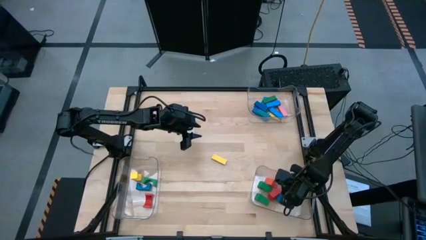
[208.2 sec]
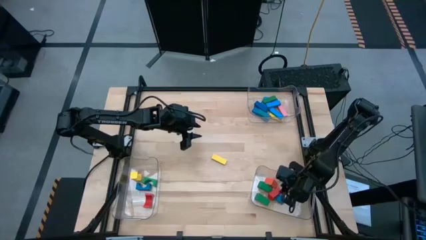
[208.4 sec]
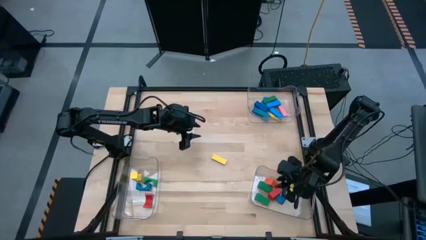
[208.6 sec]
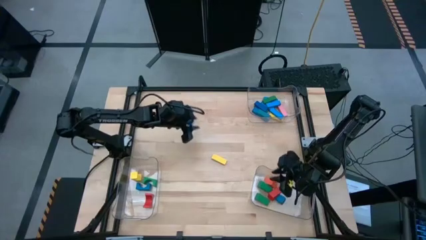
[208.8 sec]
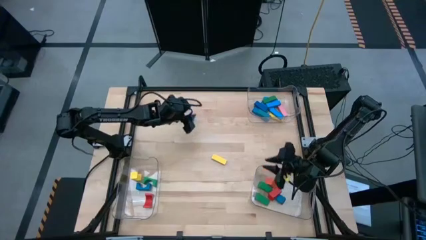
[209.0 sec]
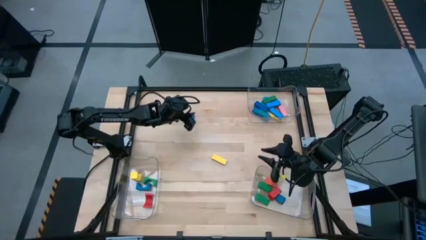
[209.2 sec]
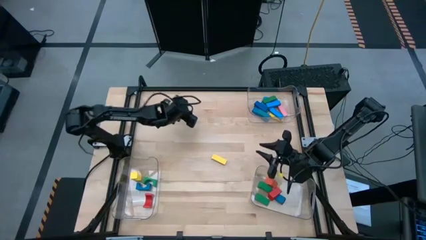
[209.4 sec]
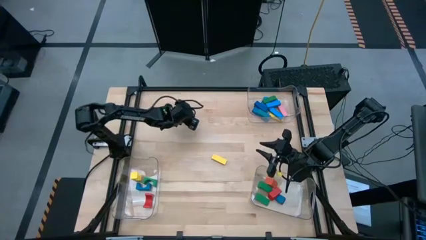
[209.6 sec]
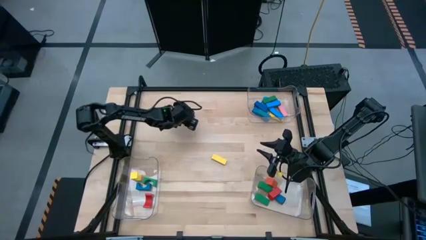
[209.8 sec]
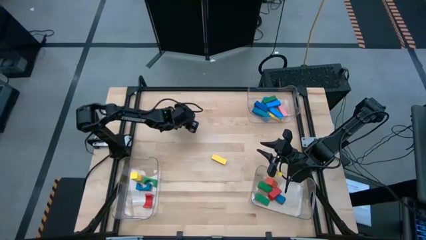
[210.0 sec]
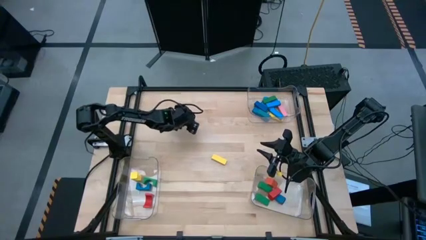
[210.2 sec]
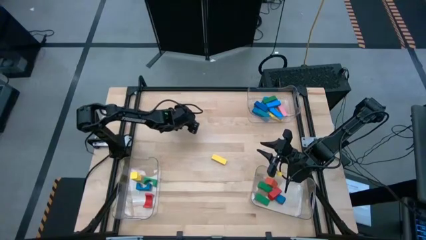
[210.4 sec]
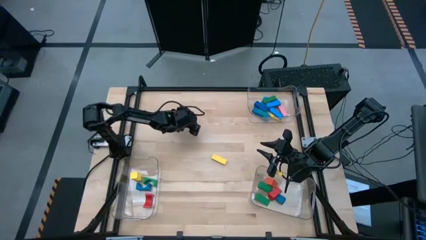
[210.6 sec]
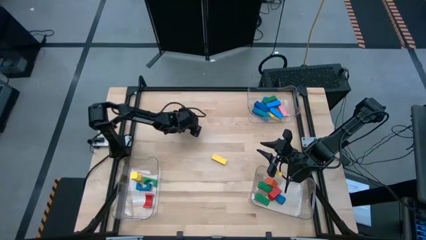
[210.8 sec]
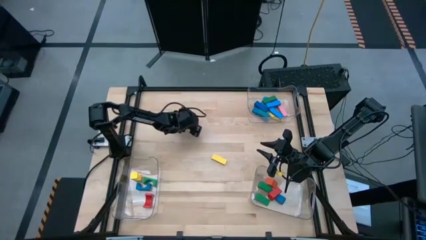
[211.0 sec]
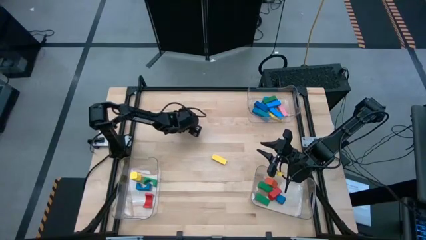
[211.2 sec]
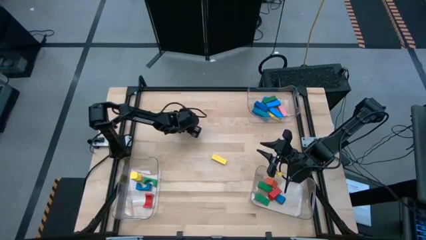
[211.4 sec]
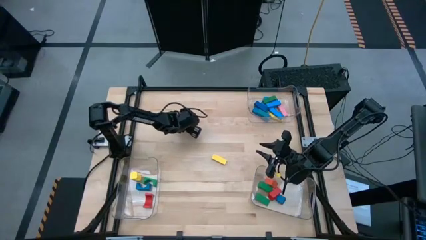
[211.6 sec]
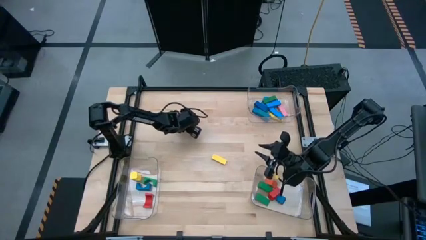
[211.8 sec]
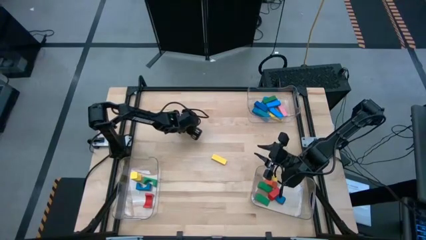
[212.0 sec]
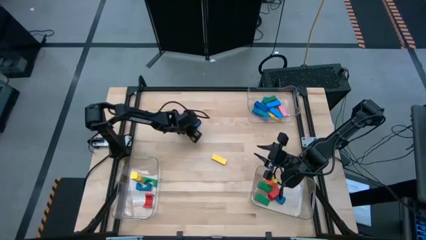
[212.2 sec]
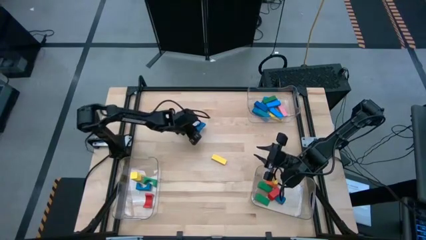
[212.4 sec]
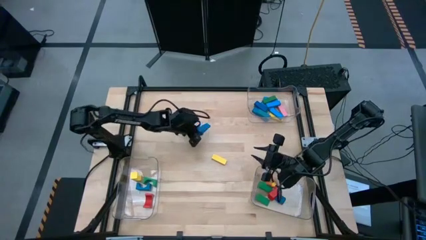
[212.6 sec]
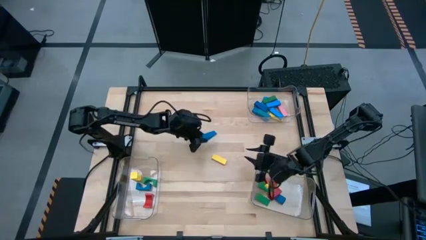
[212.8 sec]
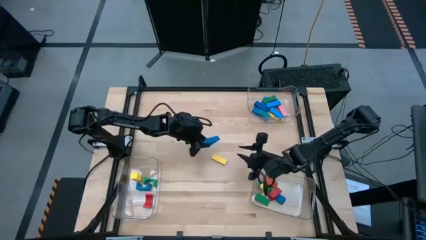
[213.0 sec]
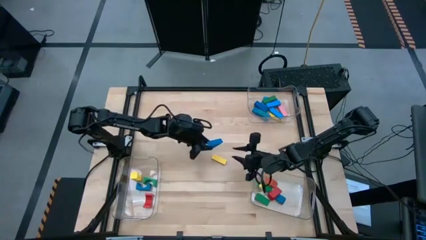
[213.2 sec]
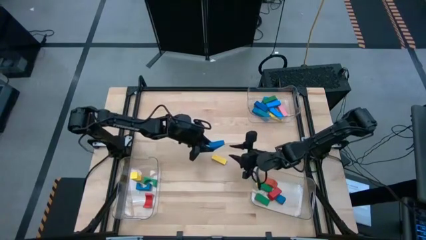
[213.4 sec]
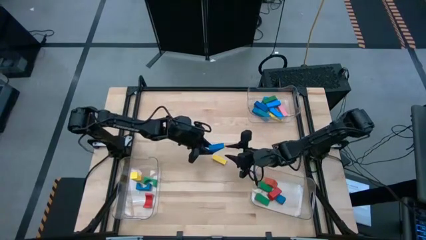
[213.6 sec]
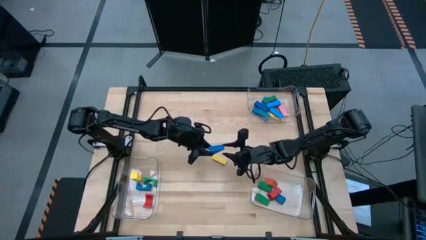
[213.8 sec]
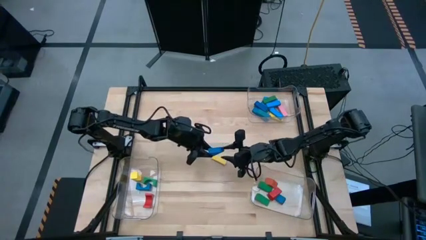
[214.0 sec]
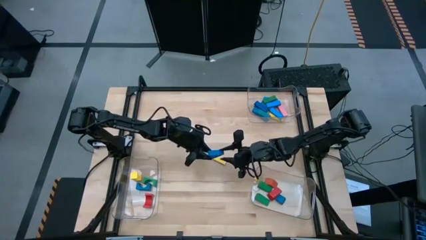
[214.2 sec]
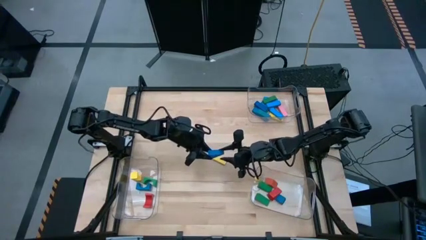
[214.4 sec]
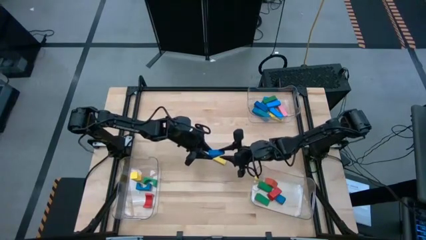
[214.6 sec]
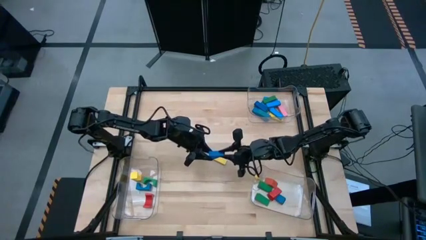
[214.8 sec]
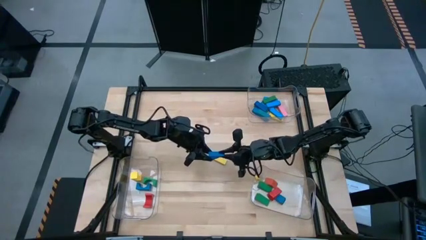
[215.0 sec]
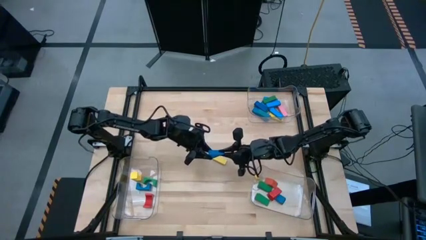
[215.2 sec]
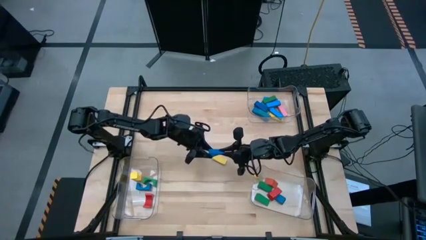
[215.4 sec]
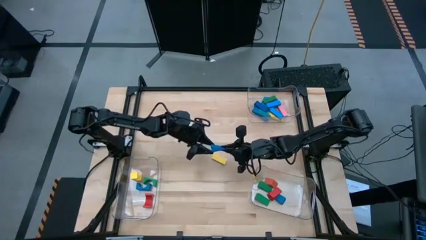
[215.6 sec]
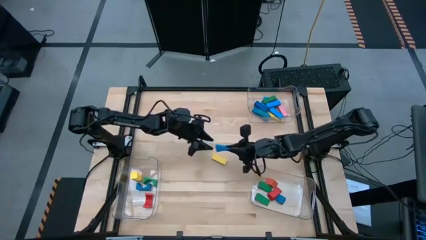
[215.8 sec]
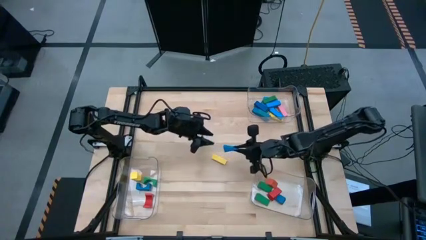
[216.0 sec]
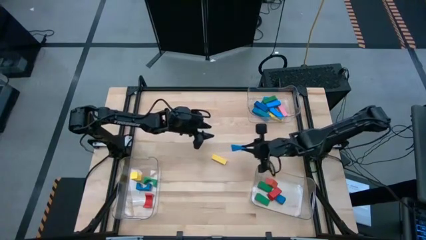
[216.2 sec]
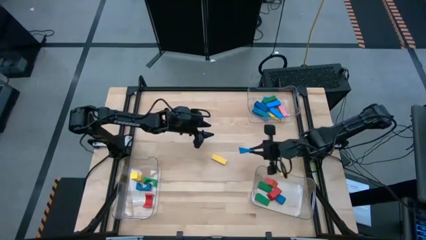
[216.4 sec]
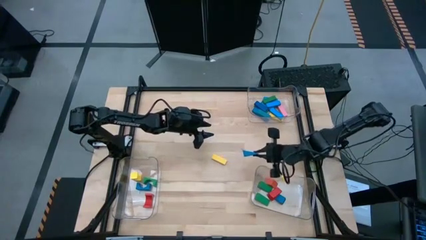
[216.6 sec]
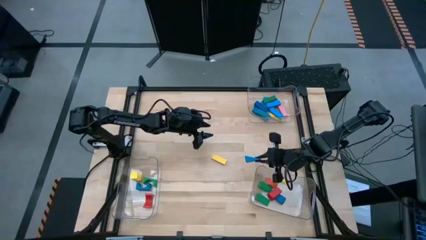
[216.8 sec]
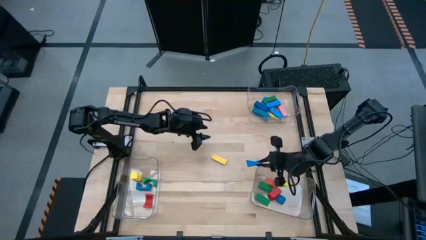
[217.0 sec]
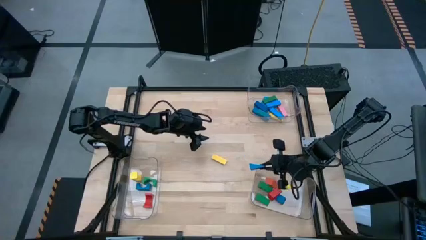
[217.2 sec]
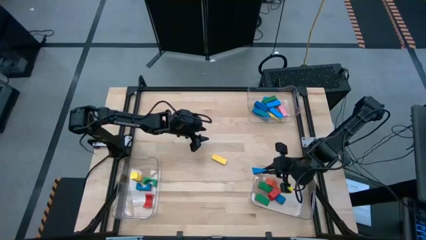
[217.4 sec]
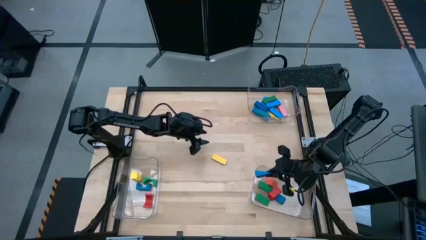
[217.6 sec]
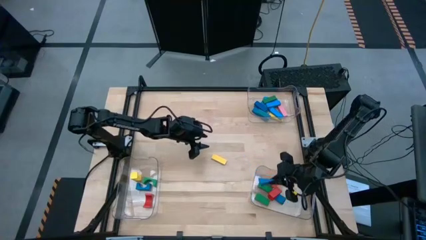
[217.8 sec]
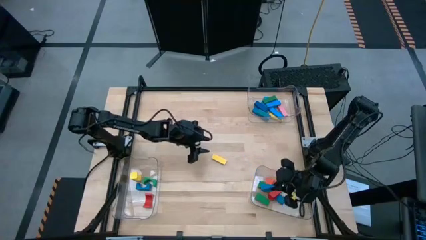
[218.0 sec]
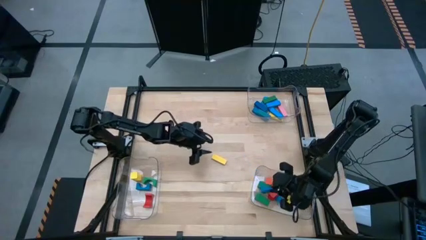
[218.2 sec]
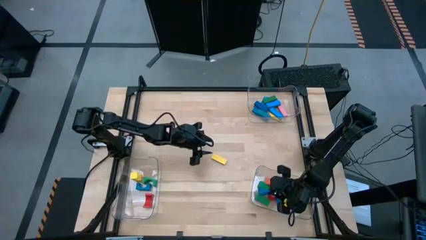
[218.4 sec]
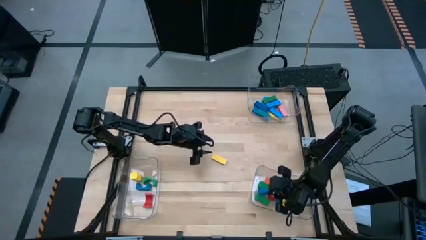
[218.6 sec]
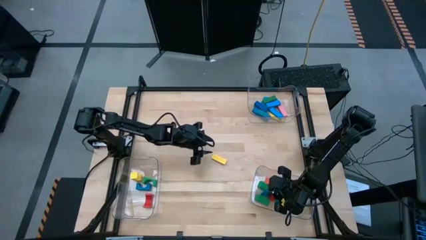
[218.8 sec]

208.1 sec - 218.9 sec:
Task: Sort blocks by size
Put the blue triangle block into the bottom right transparent bin
